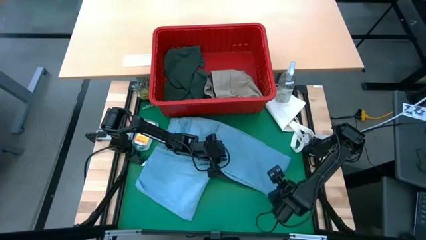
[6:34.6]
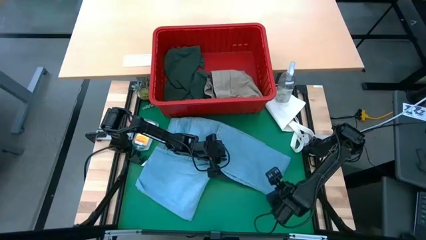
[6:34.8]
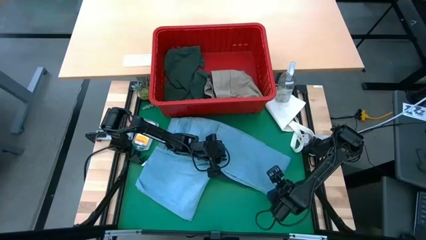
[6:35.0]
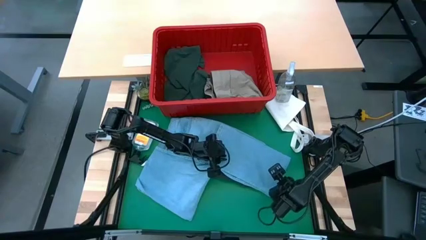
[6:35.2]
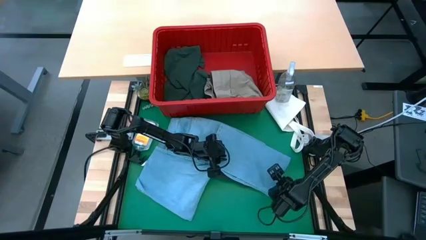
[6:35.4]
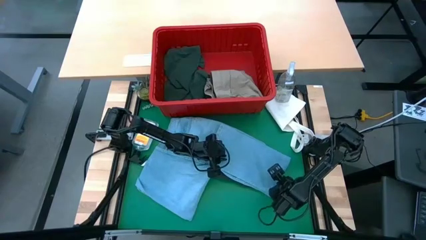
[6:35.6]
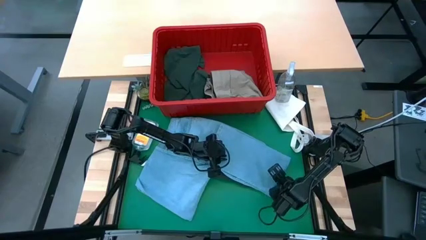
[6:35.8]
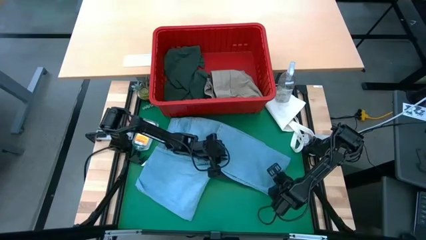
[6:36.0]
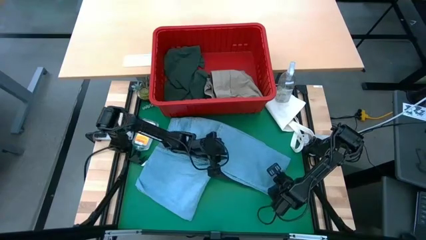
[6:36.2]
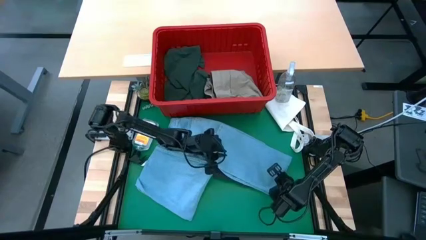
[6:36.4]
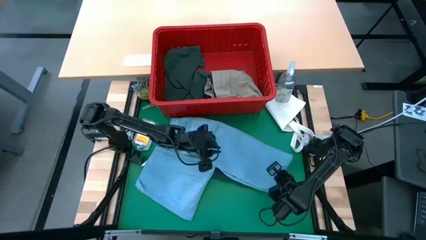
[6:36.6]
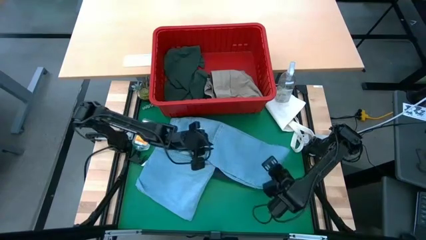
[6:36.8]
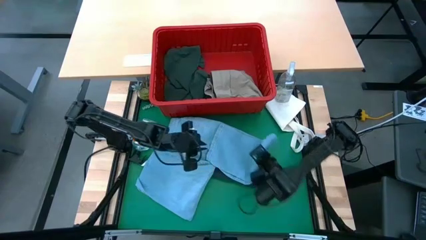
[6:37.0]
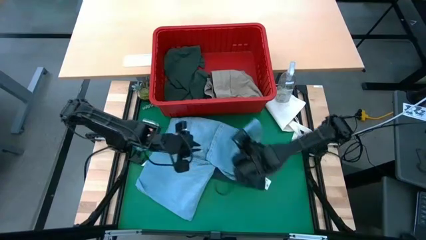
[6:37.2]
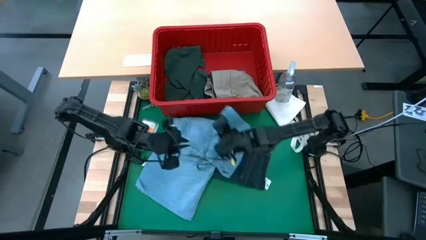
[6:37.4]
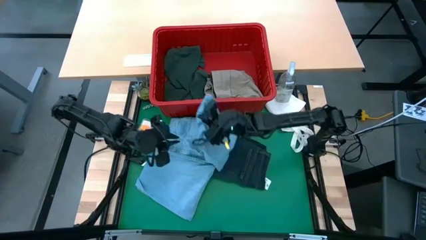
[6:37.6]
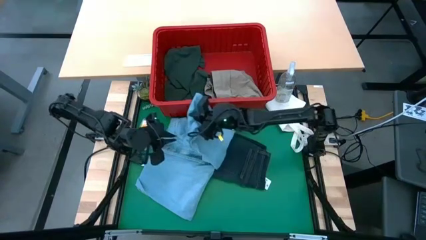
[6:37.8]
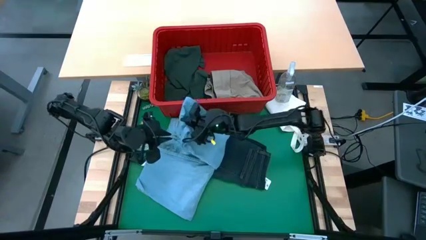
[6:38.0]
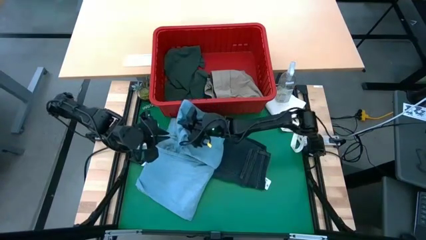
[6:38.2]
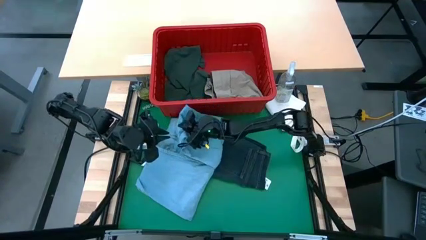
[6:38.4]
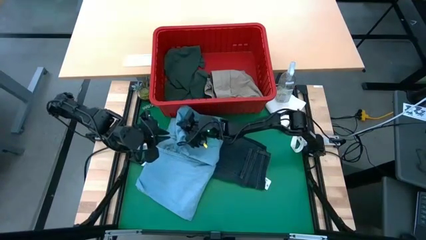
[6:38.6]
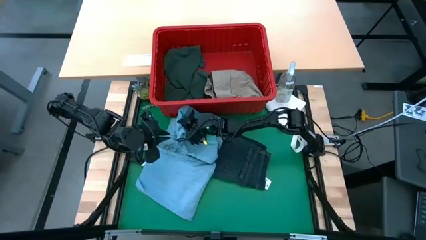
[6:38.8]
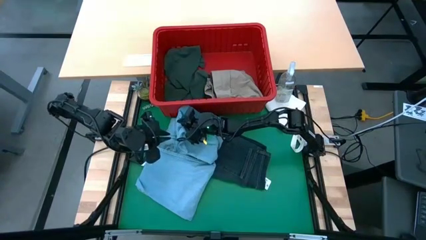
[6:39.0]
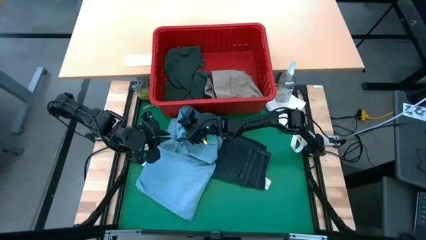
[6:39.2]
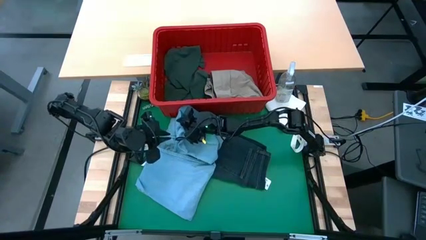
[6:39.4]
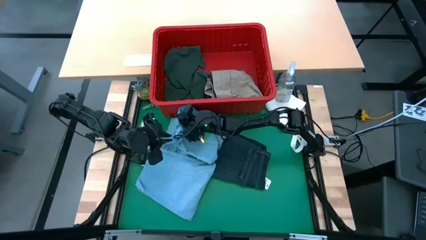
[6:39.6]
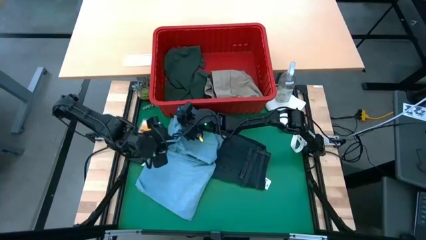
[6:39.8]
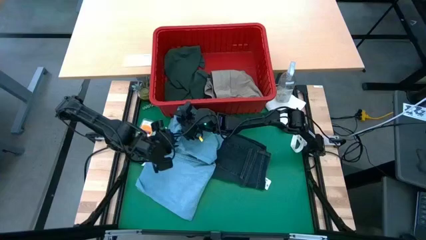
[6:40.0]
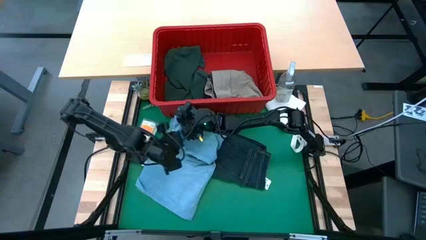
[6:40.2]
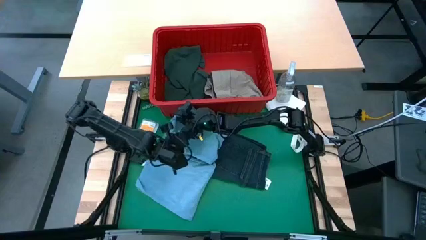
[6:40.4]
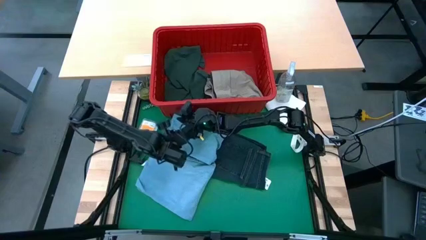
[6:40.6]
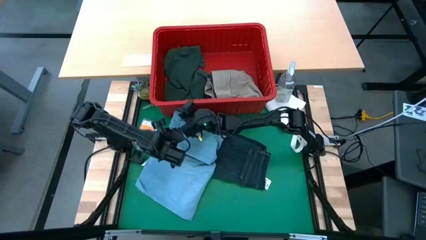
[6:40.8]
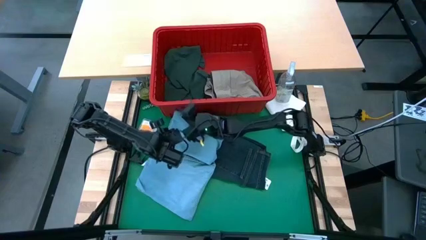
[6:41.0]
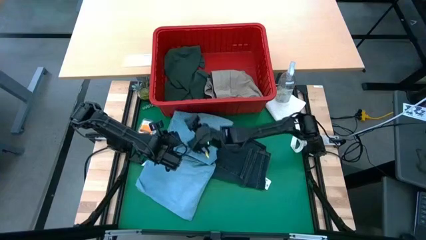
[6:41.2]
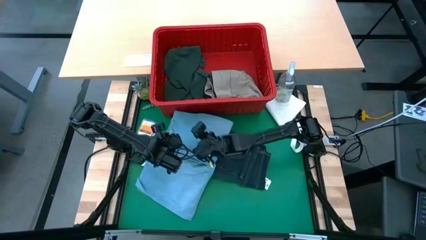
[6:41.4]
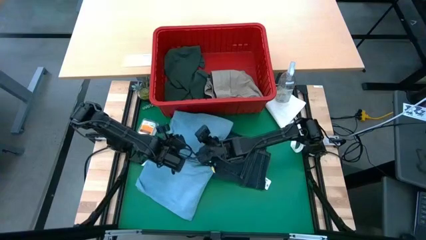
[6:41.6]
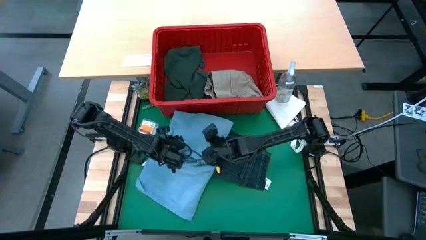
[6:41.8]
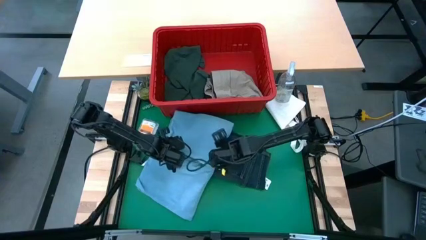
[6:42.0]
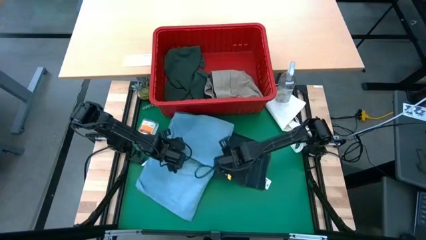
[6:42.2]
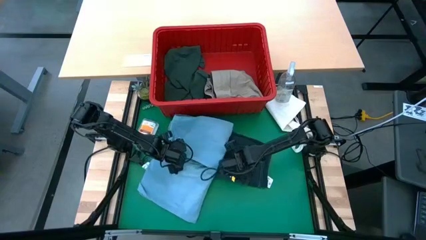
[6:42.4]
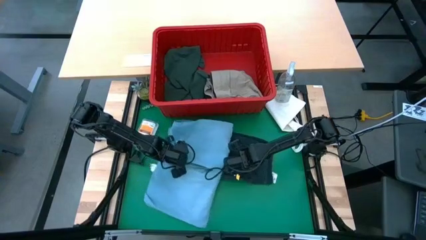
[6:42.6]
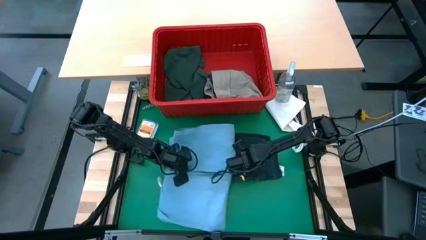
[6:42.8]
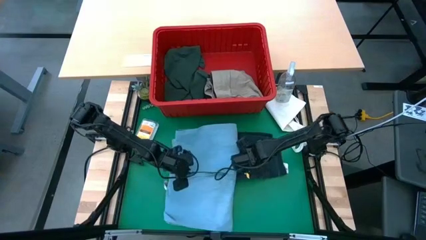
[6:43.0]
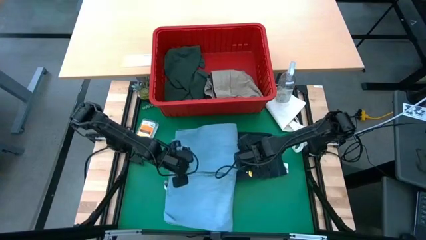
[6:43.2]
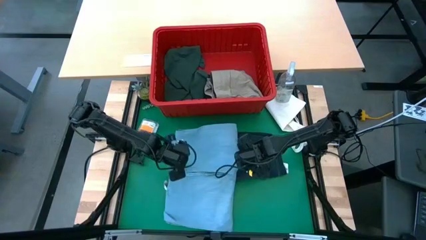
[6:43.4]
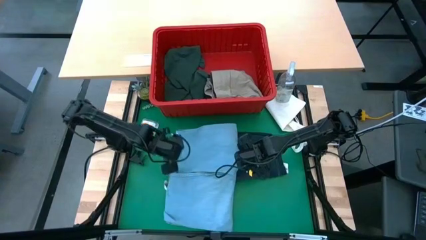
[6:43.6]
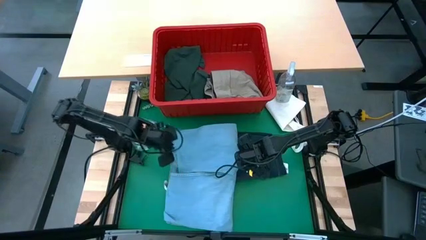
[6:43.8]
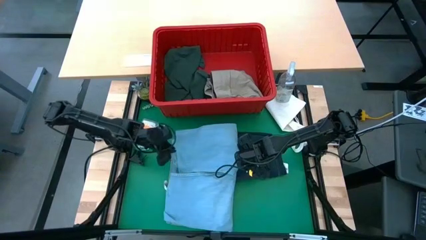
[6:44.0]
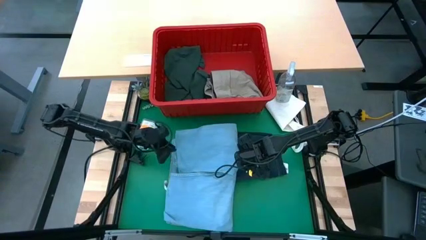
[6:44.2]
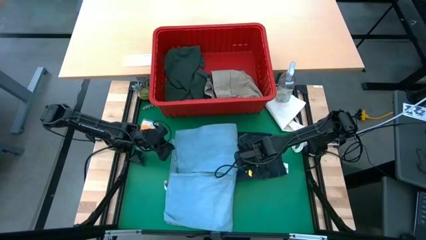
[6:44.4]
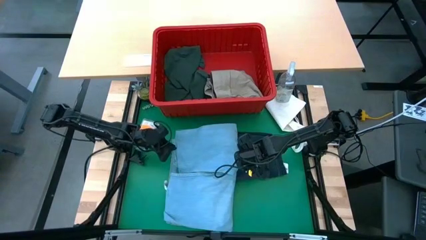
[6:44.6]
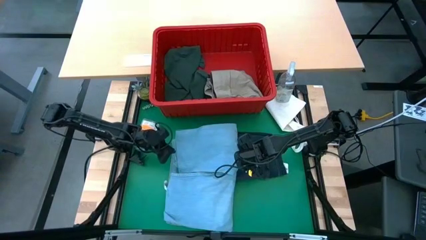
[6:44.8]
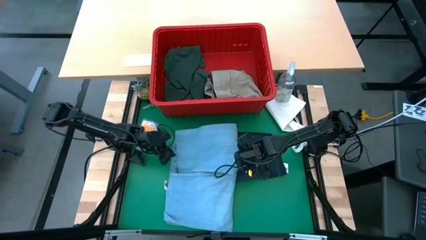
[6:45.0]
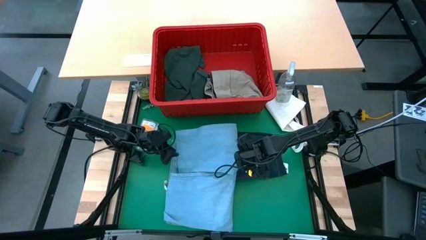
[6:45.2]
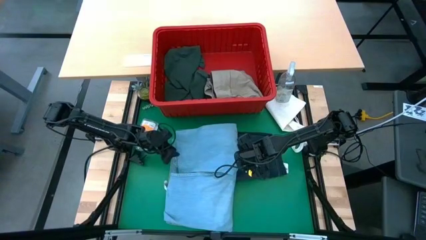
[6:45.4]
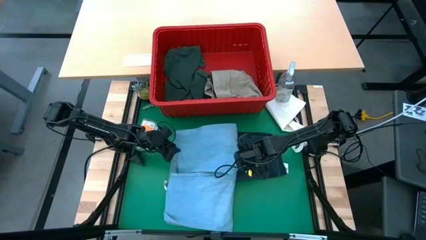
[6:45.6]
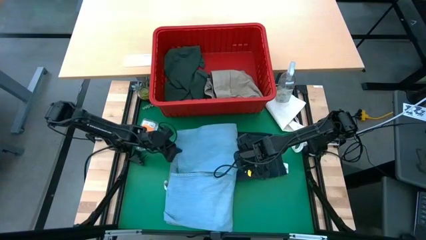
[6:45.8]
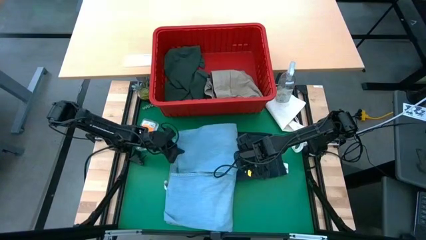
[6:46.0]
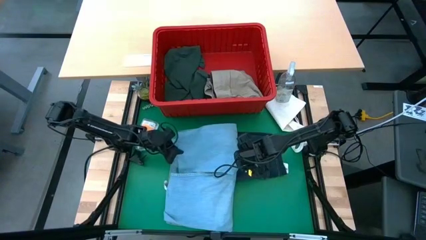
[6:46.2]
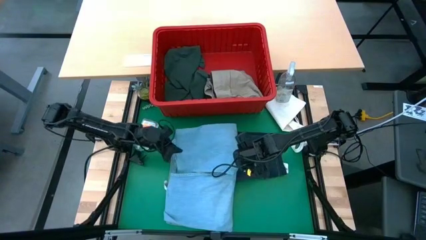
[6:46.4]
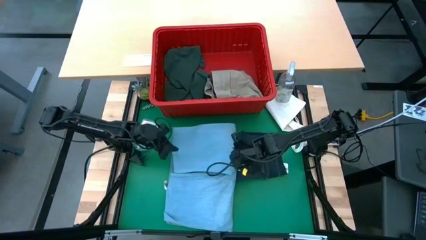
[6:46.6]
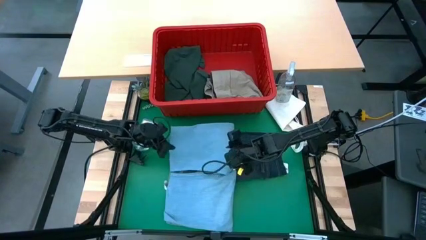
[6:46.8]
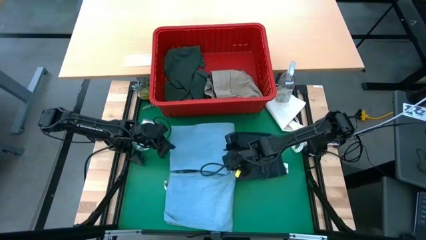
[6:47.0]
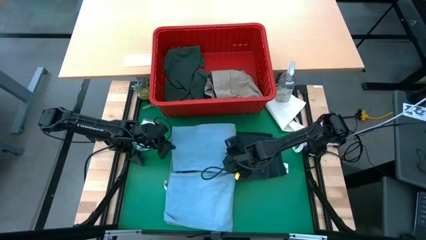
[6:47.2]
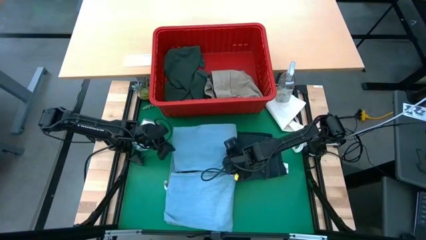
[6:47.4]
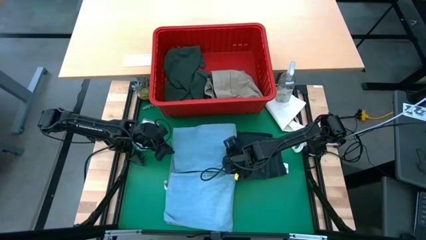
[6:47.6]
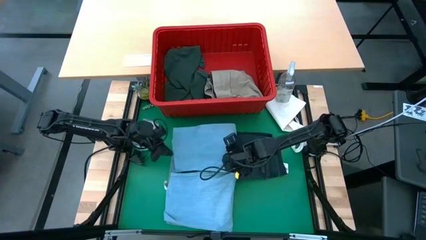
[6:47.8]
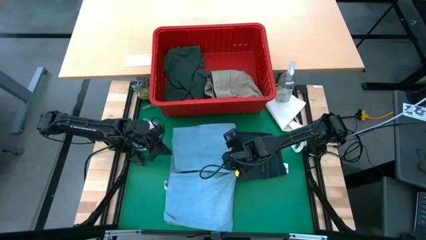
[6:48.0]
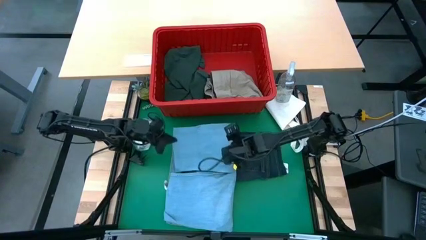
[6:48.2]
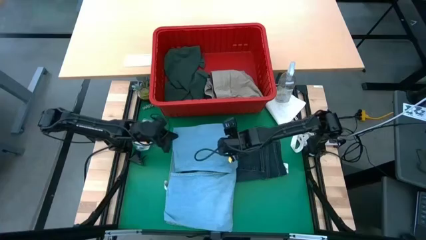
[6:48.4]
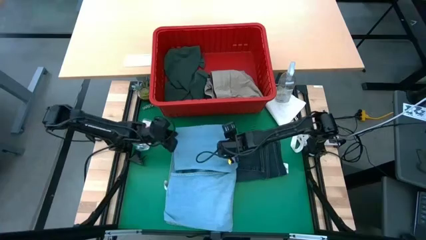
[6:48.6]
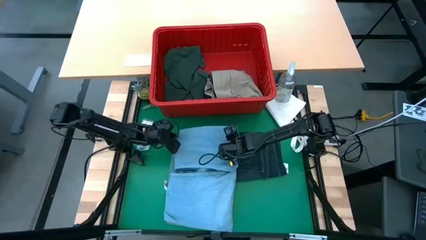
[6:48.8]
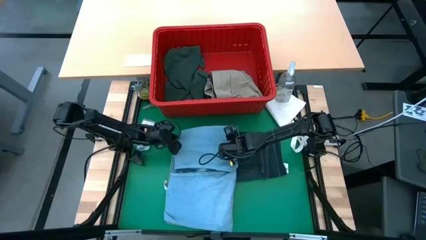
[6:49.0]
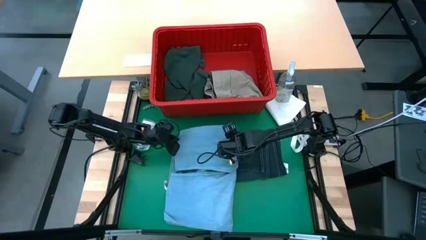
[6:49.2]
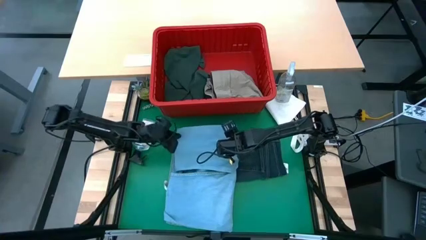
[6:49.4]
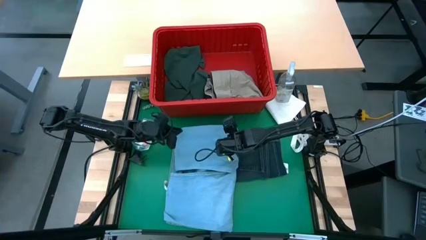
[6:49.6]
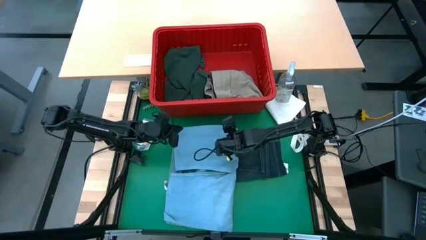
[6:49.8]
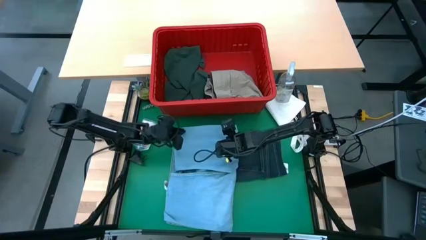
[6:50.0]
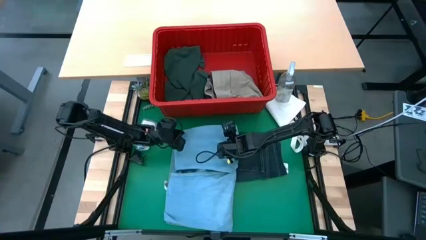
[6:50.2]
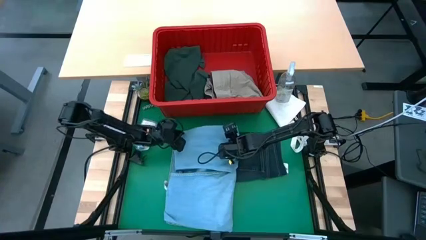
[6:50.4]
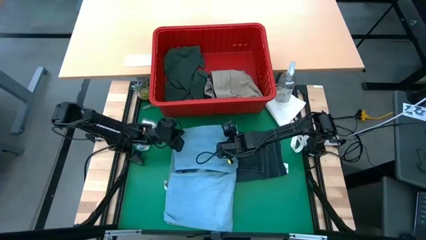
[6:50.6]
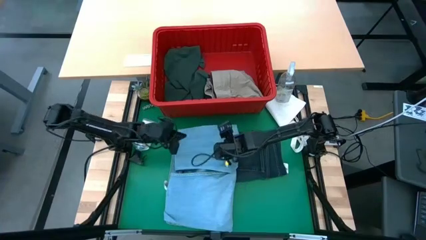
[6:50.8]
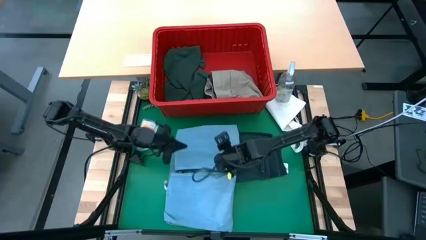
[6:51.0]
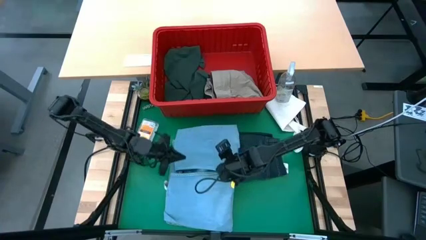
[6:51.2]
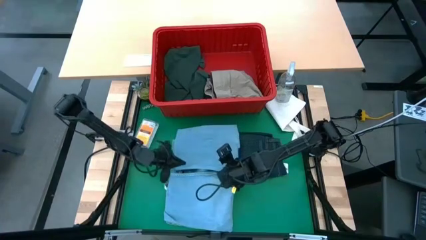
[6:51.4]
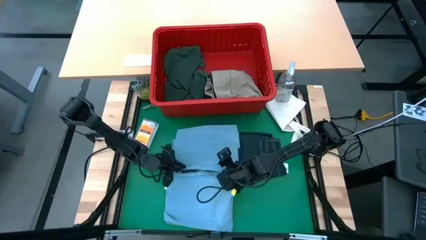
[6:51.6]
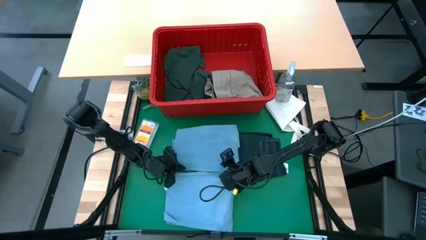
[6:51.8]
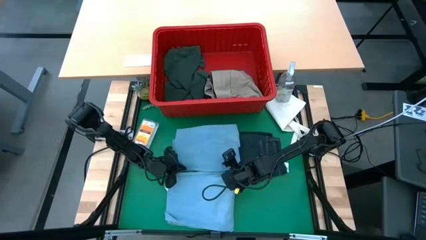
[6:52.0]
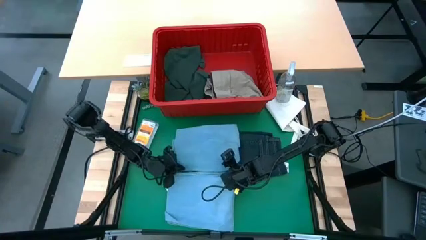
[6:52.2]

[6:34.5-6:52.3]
Task: Fold laundry
Fold the light blue jeans
